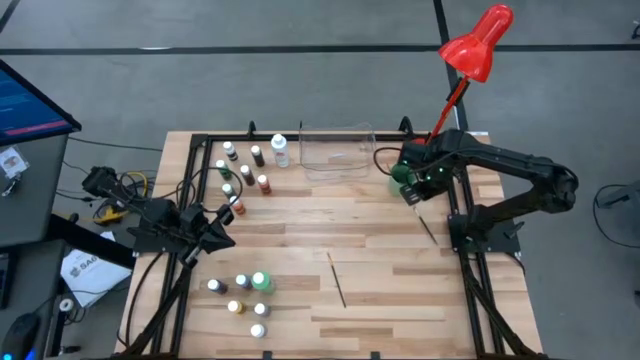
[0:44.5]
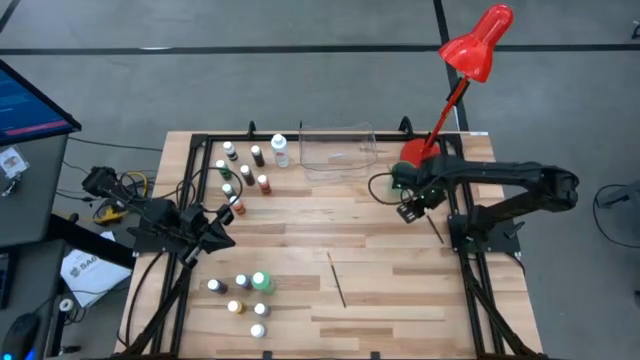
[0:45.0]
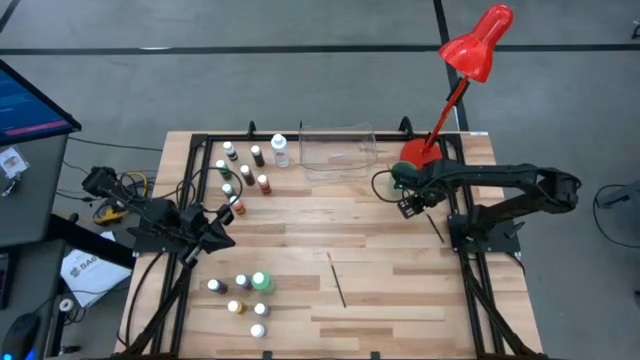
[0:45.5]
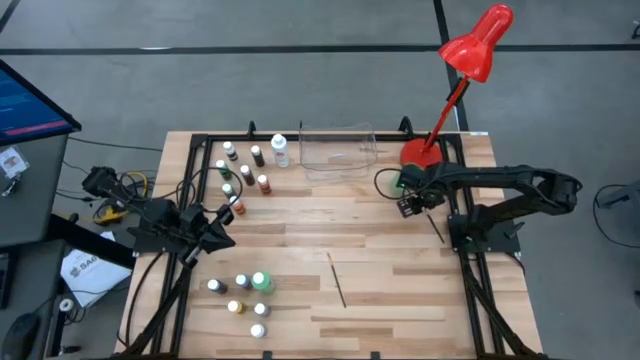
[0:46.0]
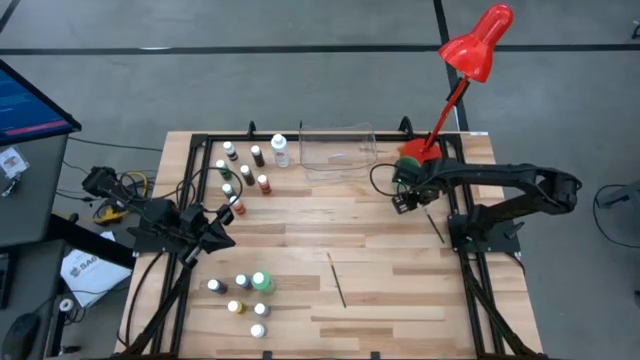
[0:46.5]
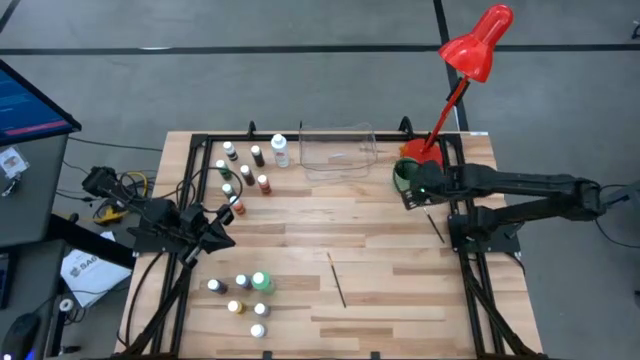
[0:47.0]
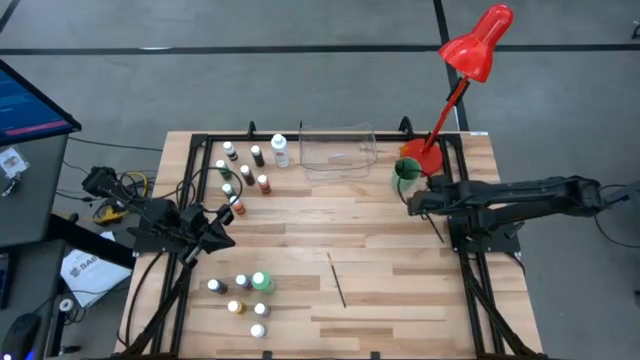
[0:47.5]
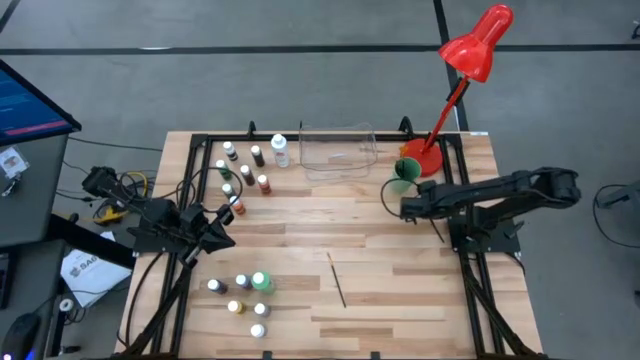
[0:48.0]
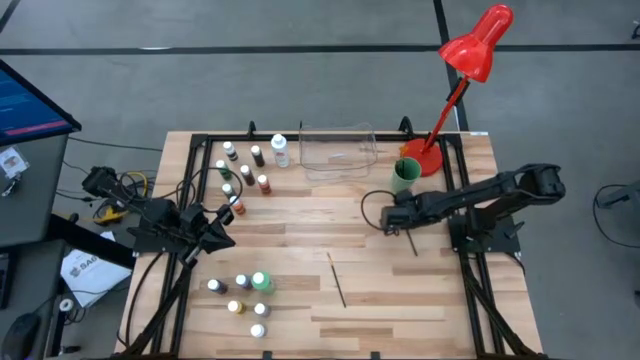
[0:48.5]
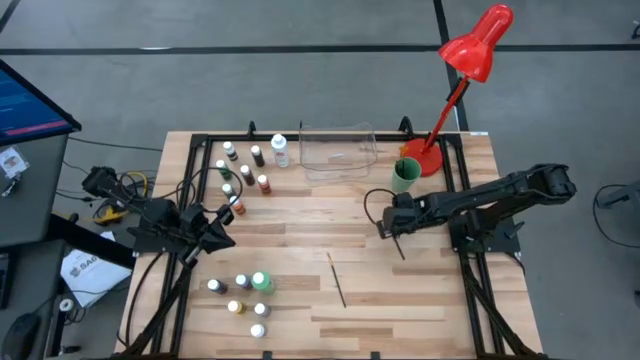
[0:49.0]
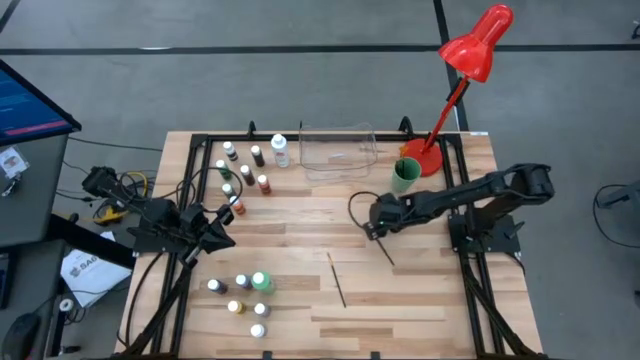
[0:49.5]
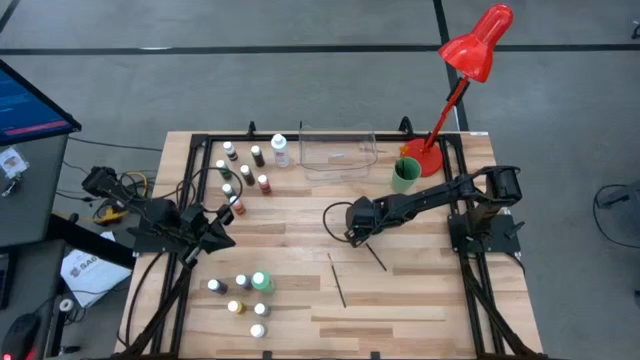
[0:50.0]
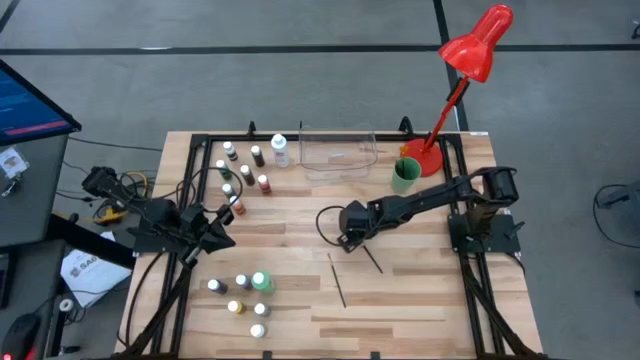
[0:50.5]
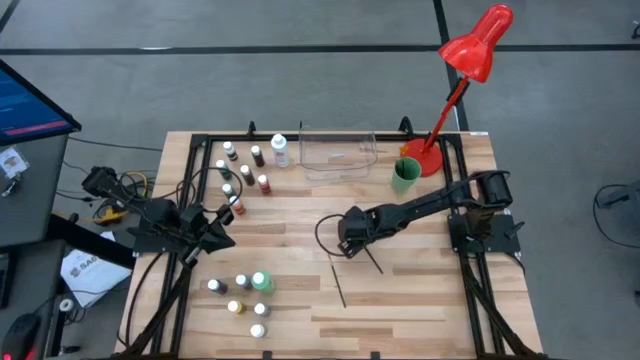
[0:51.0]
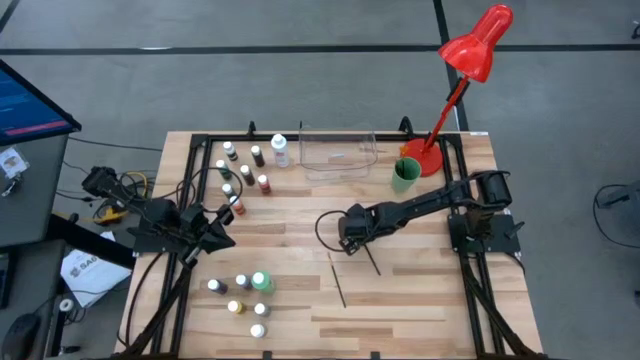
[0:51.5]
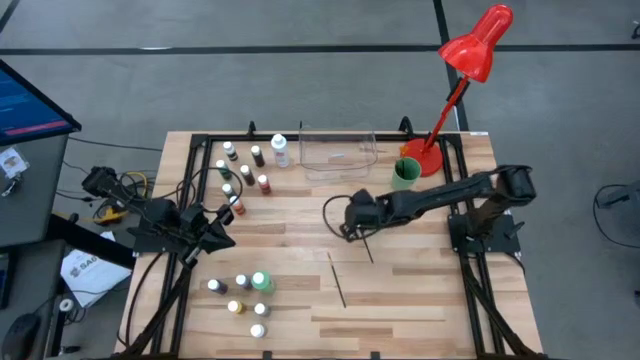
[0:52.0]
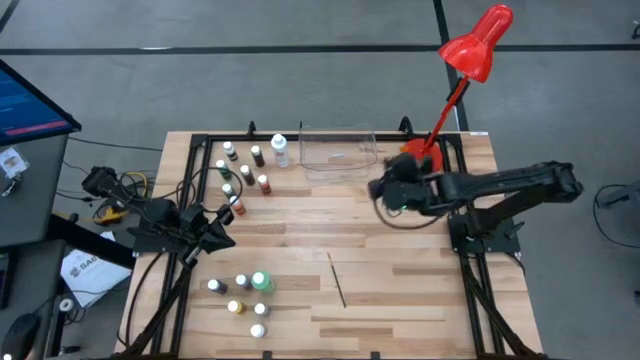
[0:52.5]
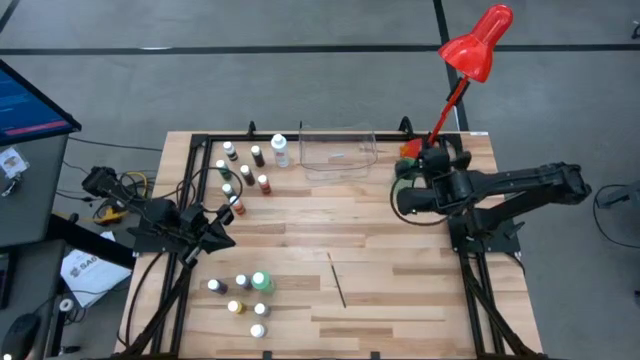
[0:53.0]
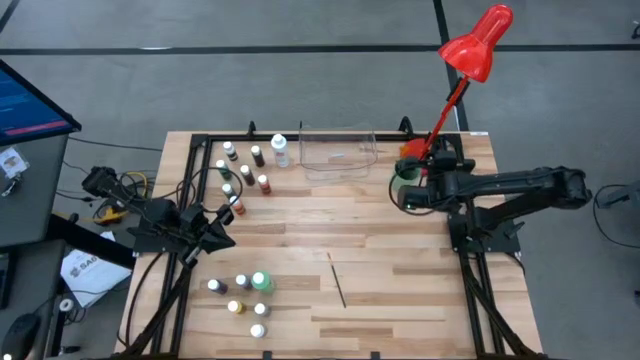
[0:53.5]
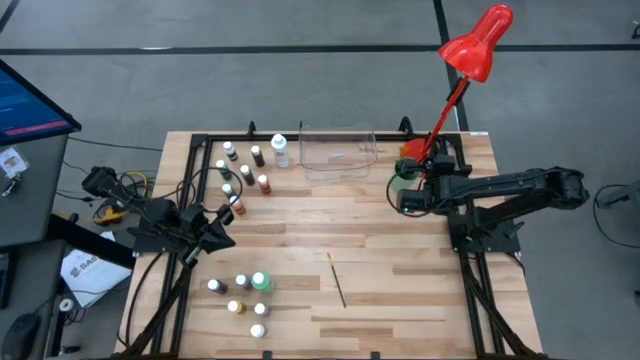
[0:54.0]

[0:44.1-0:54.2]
Task: Pick & Place Paint Supplies
Put the silver paint brush into the green cup

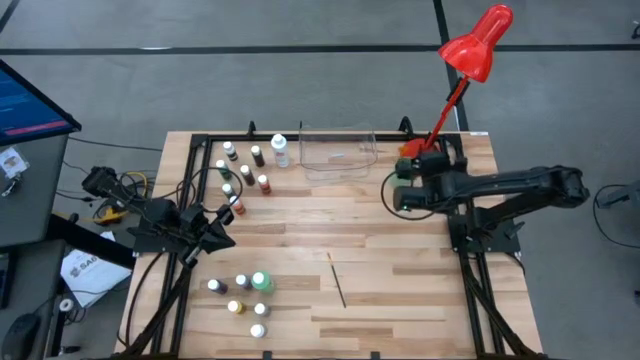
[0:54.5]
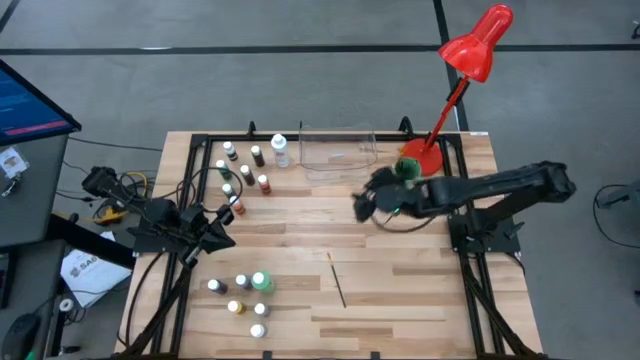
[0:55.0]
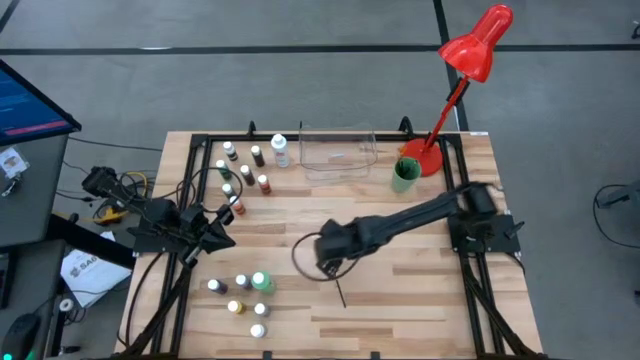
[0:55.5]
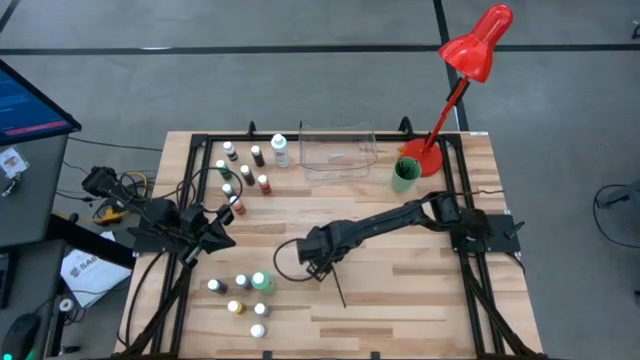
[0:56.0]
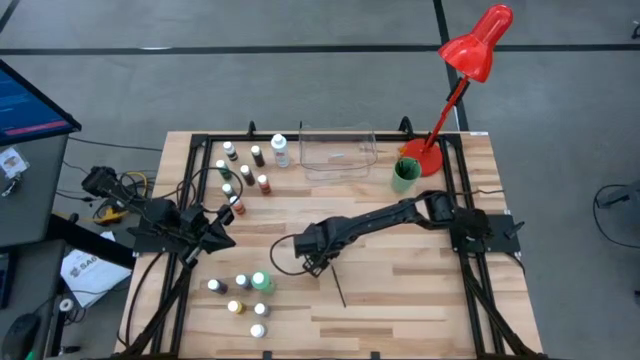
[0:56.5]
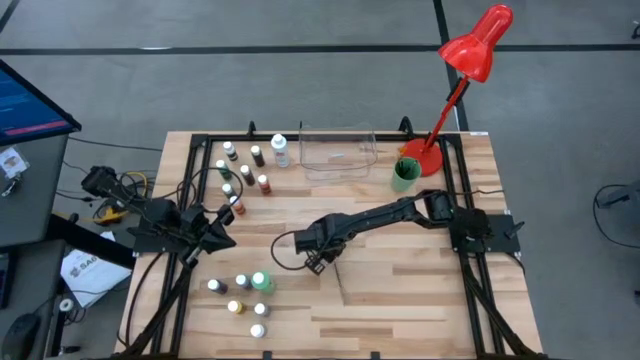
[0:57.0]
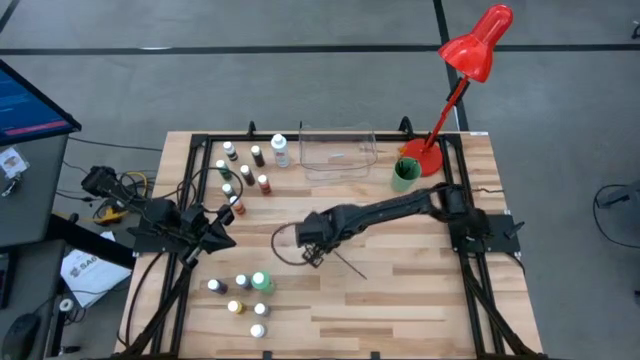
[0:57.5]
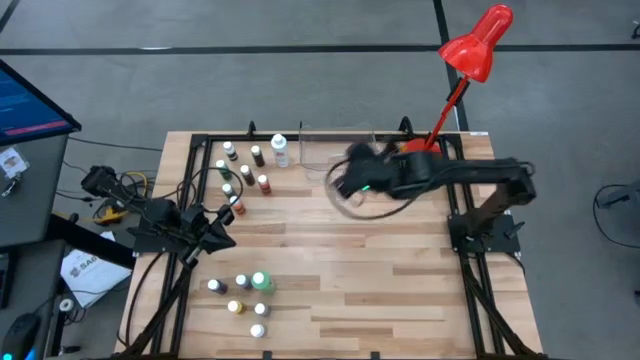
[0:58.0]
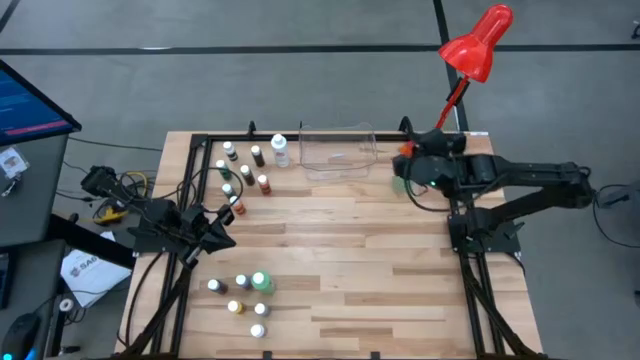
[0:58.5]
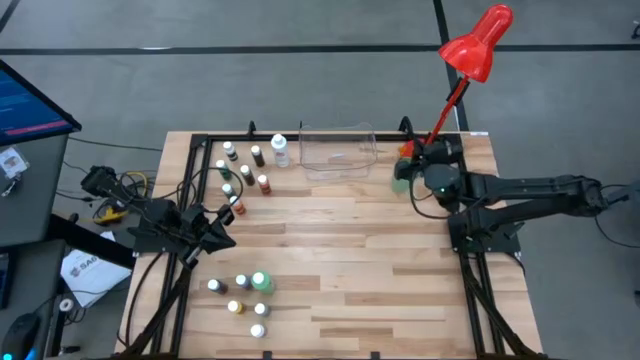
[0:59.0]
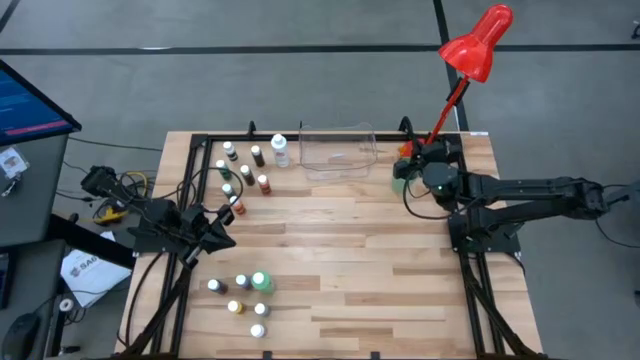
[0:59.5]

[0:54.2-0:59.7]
Put the gold paint brush into the green cup

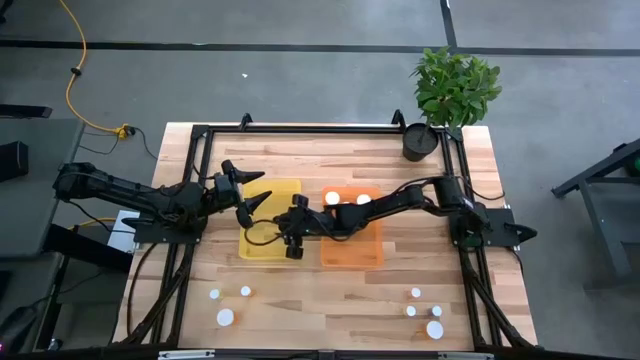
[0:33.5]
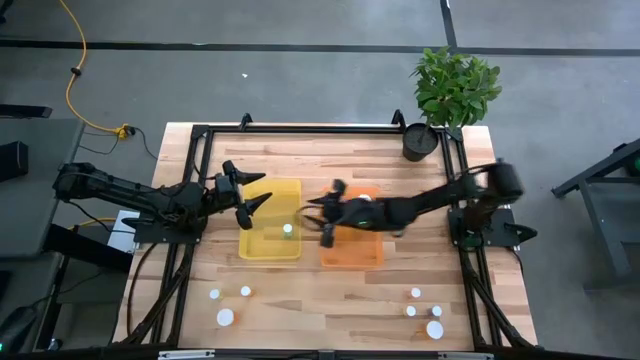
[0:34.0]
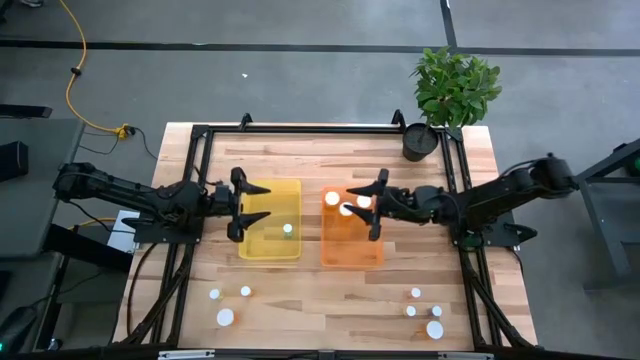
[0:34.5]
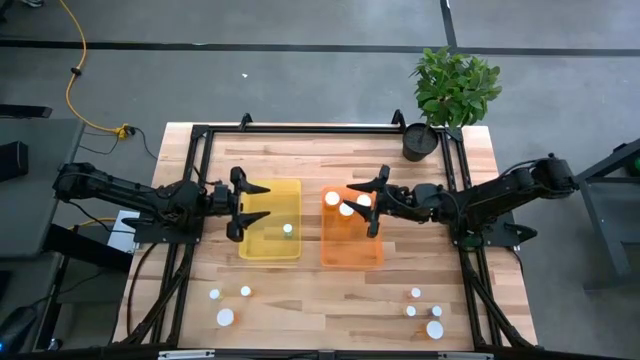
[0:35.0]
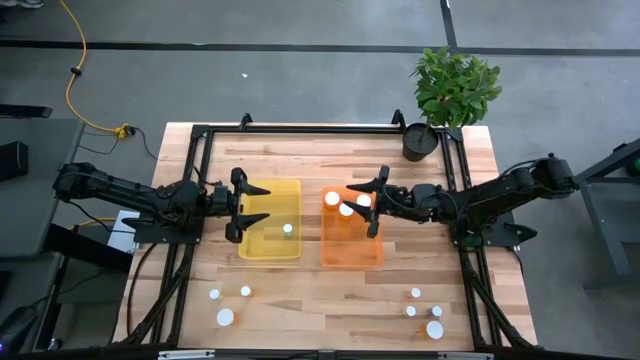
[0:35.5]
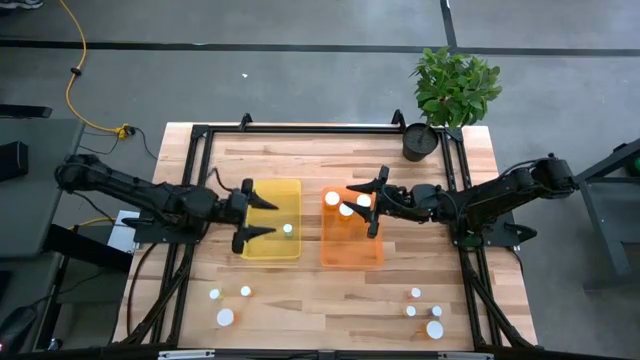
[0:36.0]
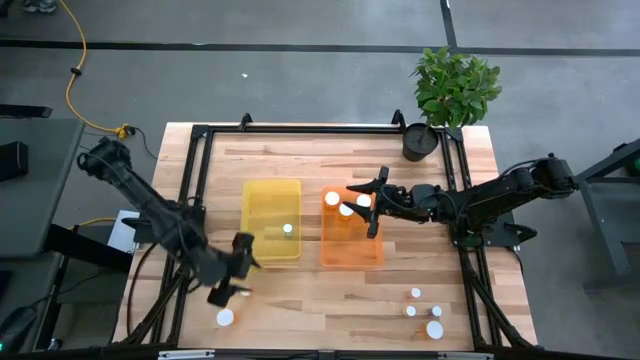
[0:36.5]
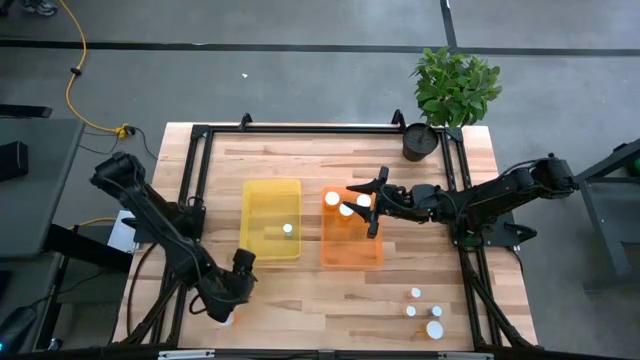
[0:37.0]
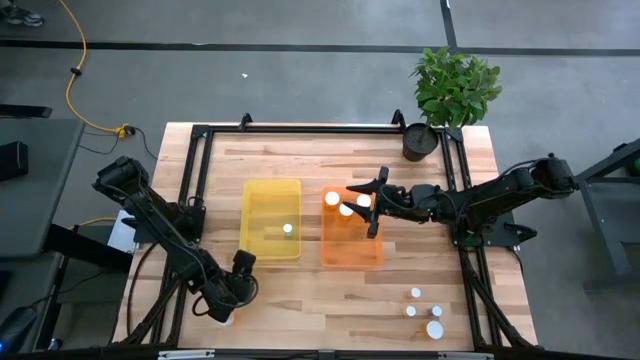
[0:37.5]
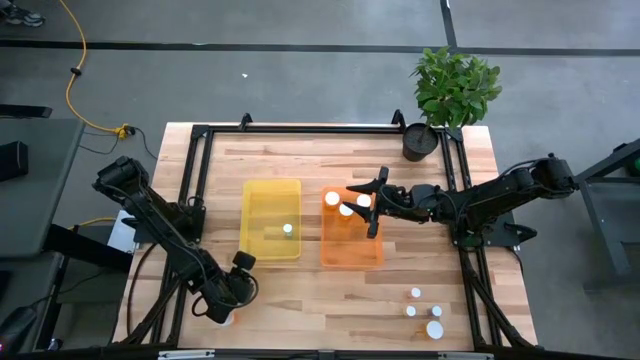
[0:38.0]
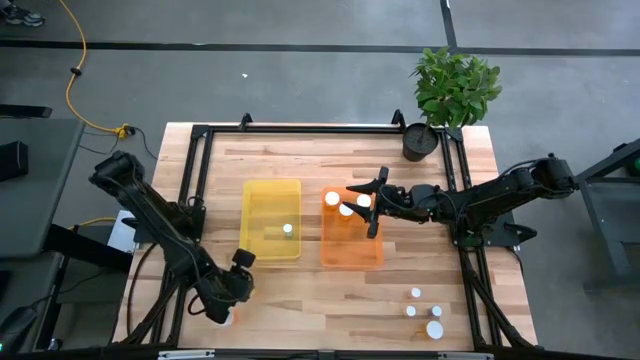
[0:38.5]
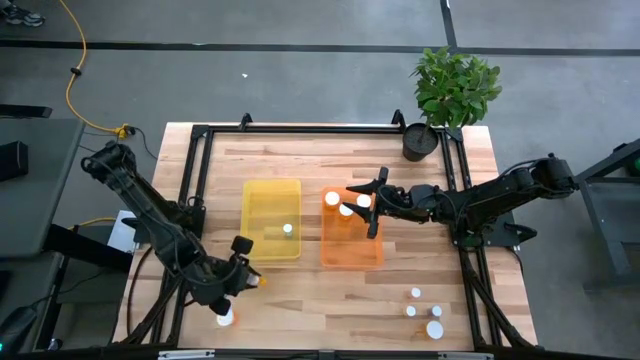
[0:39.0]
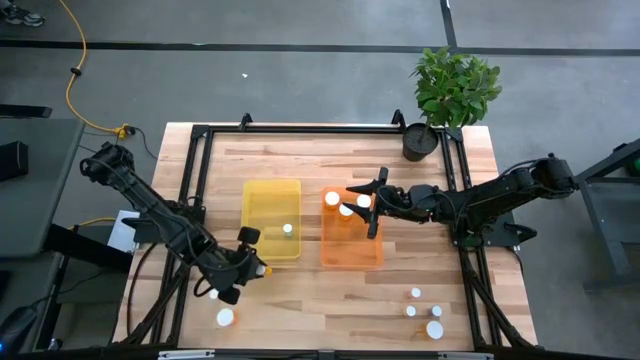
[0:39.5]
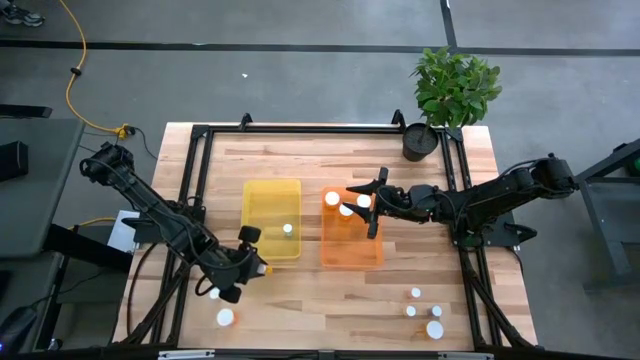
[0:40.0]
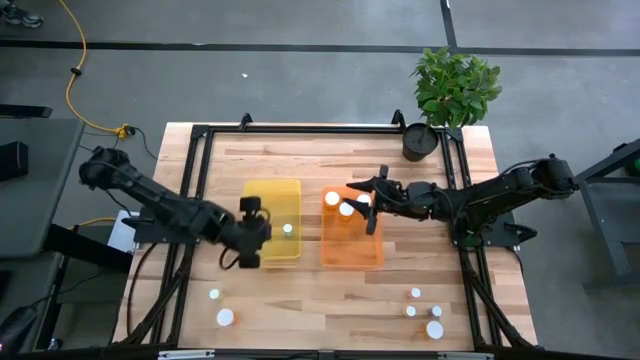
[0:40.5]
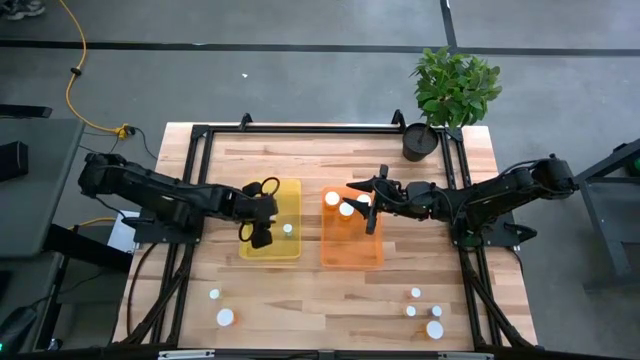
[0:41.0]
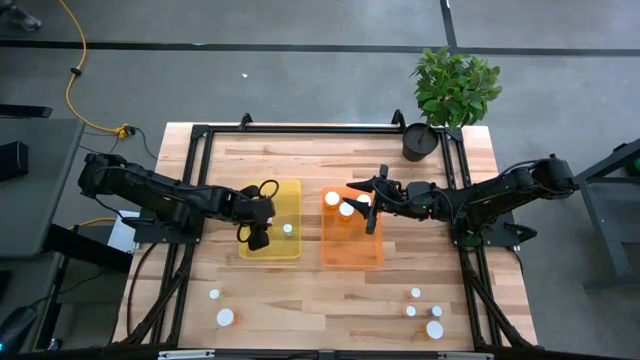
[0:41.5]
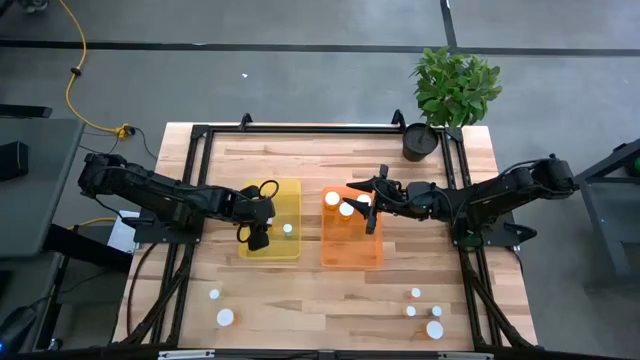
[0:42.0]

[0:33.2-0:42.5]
Task: Pick and place medicine bottles into bin by pill shape (circle, oval)
Put the orange tablet bottle into the yellow bin
